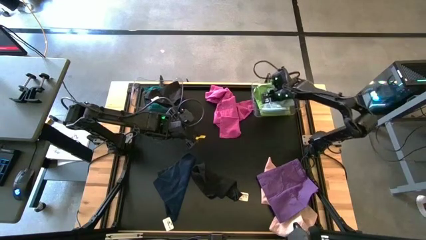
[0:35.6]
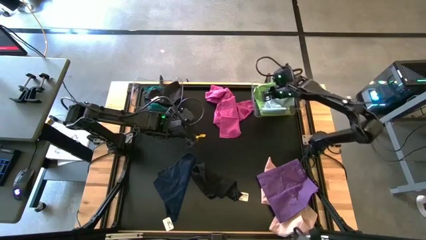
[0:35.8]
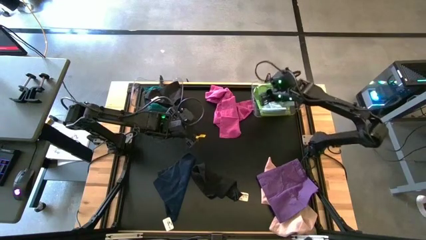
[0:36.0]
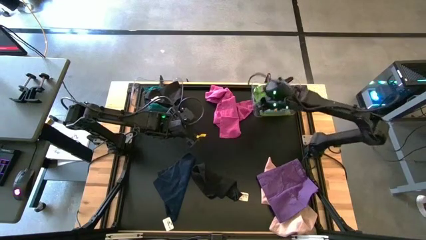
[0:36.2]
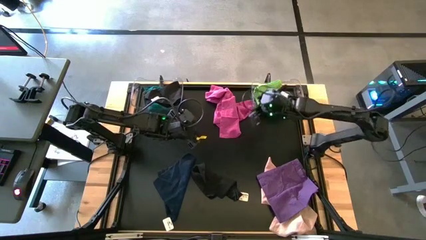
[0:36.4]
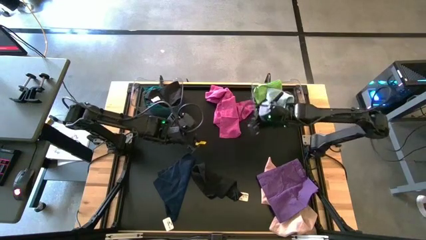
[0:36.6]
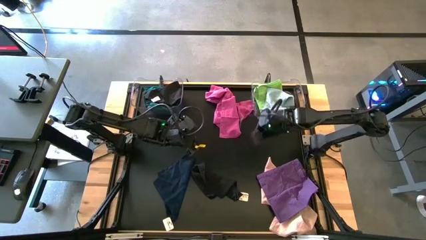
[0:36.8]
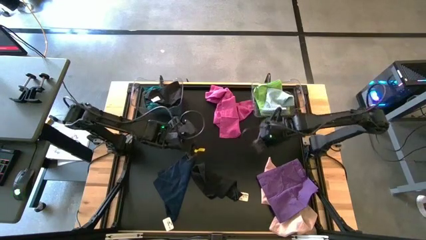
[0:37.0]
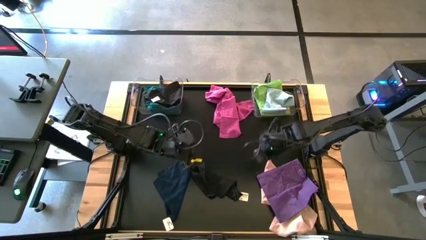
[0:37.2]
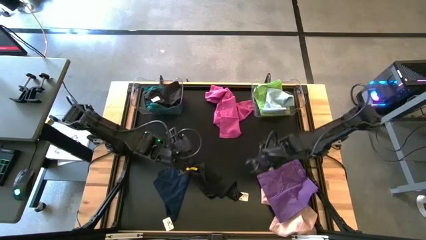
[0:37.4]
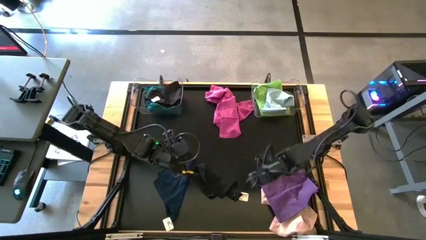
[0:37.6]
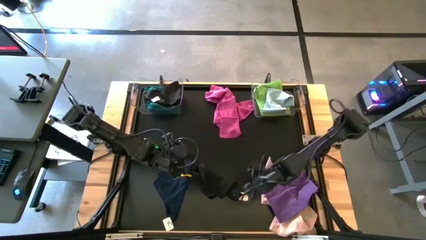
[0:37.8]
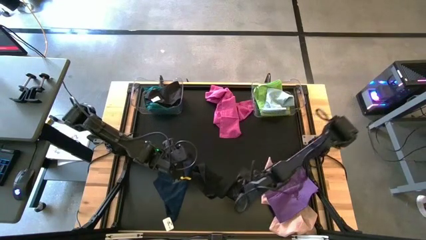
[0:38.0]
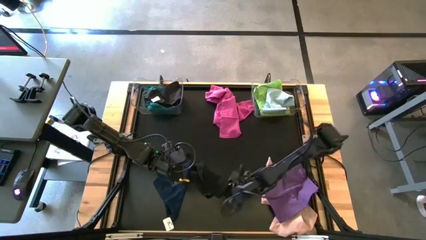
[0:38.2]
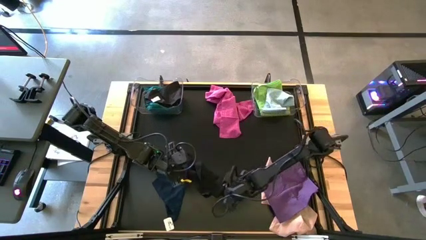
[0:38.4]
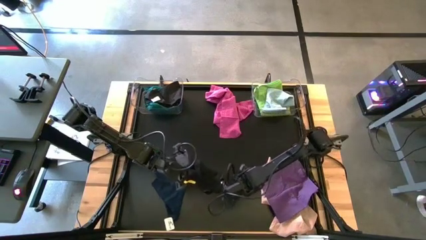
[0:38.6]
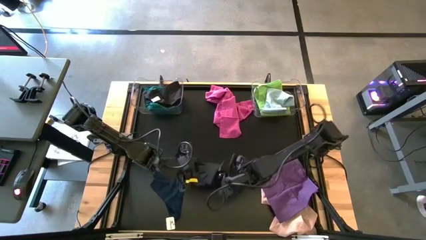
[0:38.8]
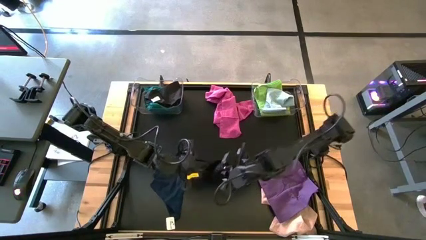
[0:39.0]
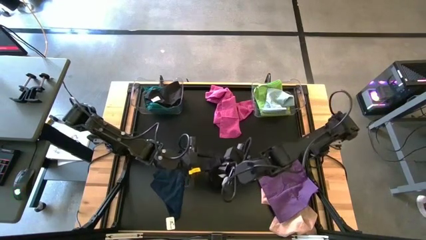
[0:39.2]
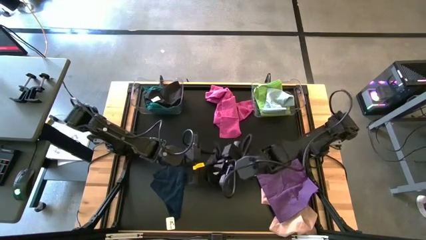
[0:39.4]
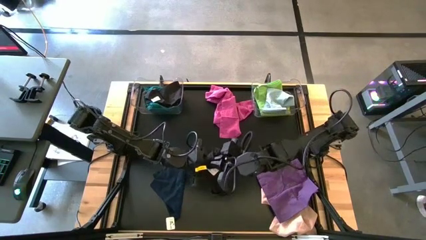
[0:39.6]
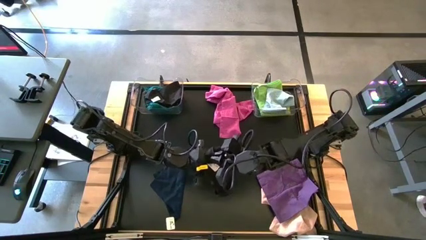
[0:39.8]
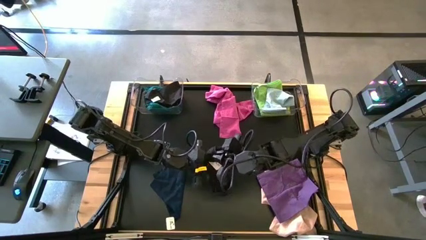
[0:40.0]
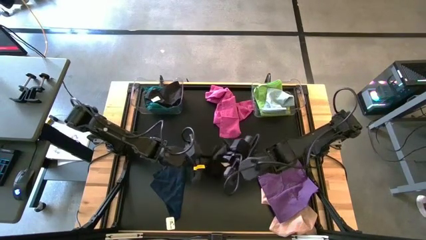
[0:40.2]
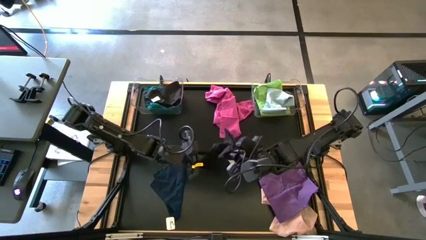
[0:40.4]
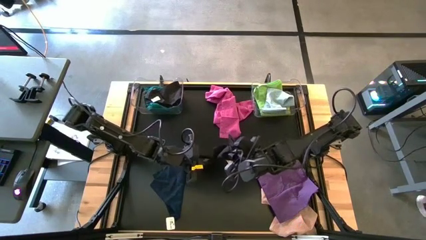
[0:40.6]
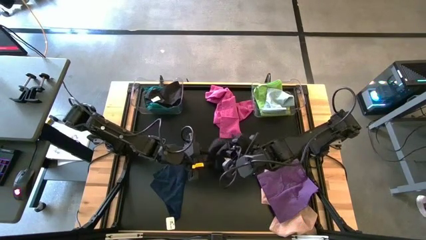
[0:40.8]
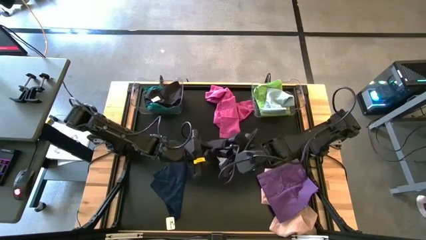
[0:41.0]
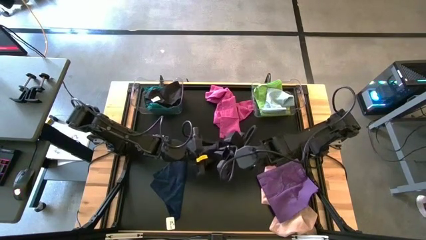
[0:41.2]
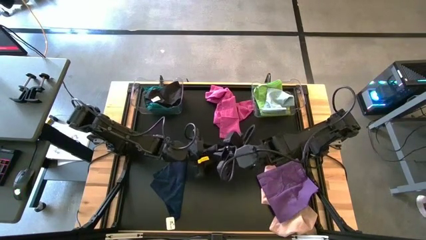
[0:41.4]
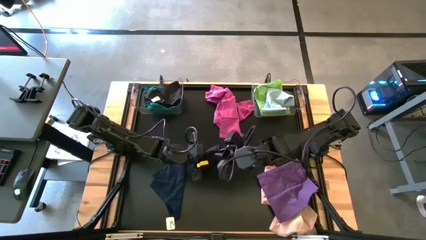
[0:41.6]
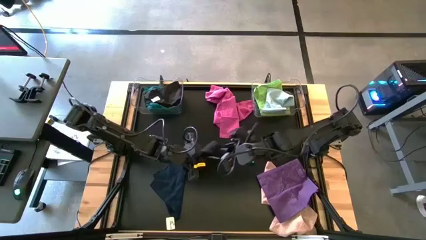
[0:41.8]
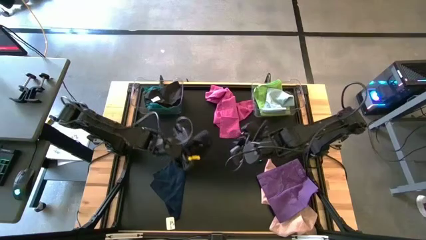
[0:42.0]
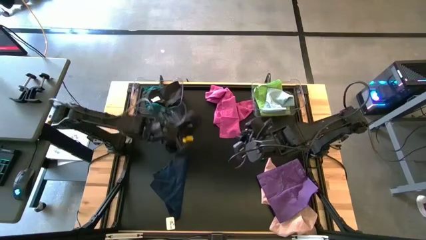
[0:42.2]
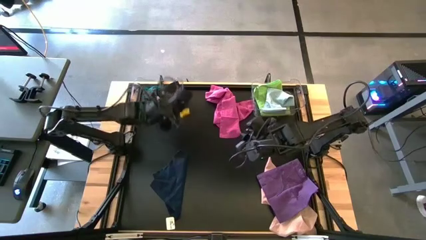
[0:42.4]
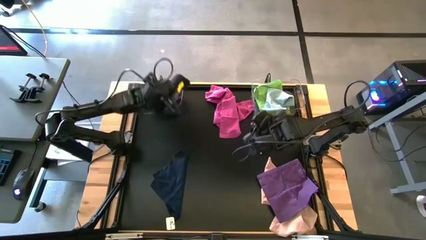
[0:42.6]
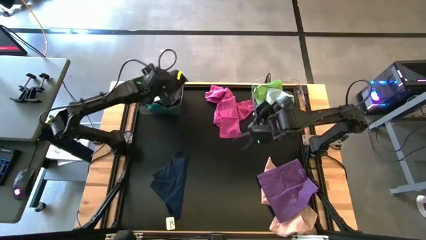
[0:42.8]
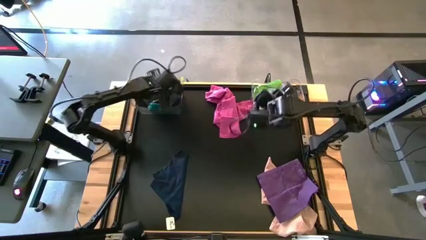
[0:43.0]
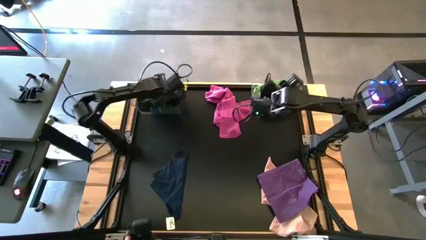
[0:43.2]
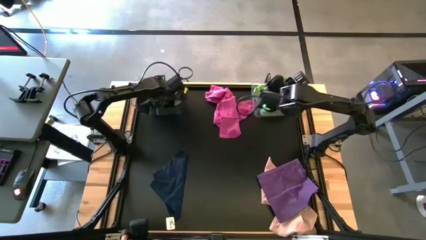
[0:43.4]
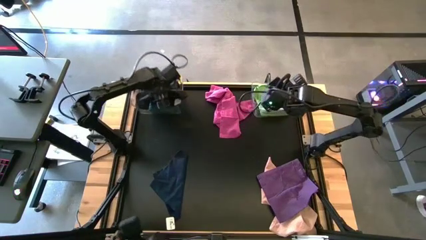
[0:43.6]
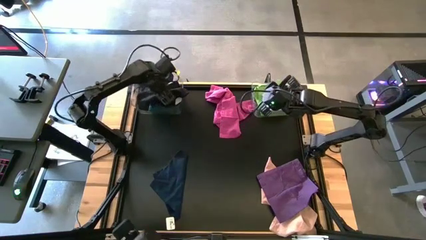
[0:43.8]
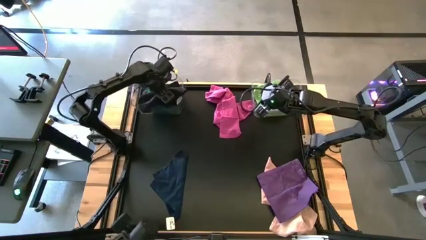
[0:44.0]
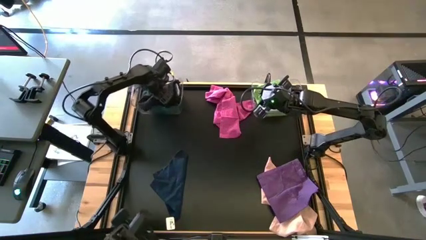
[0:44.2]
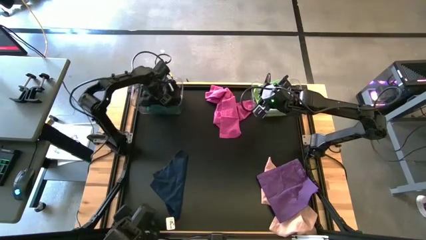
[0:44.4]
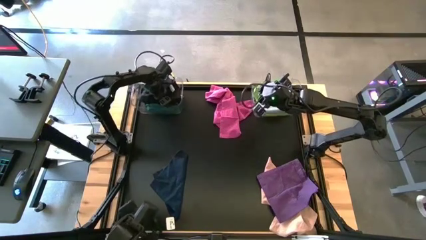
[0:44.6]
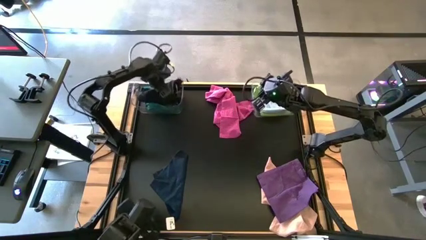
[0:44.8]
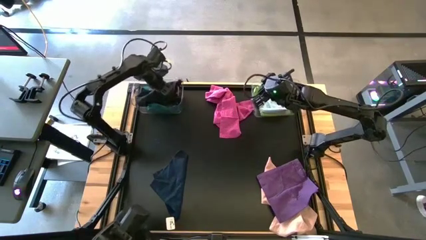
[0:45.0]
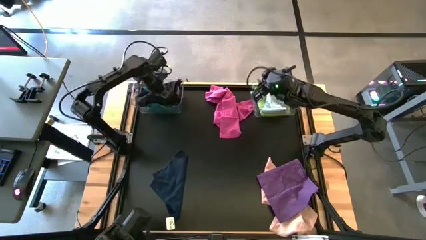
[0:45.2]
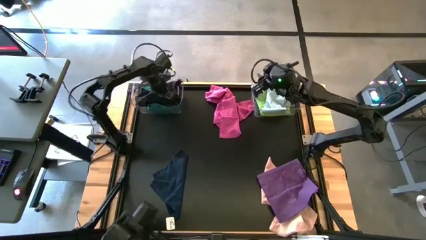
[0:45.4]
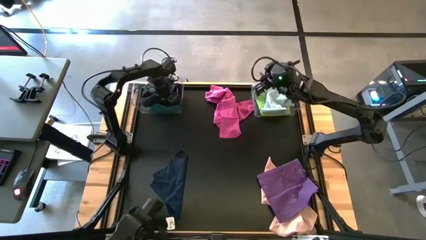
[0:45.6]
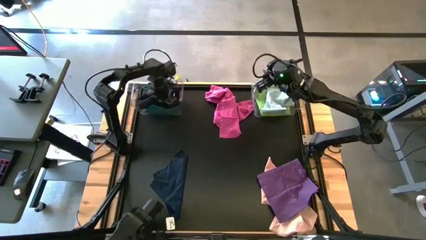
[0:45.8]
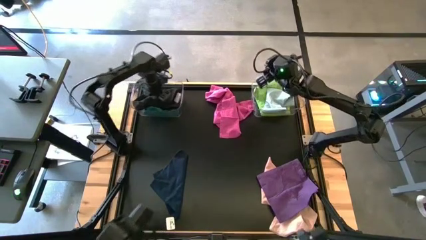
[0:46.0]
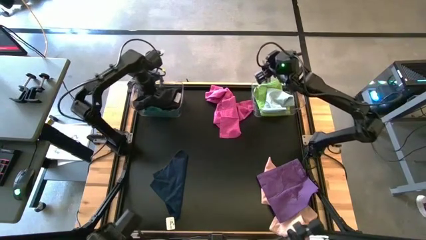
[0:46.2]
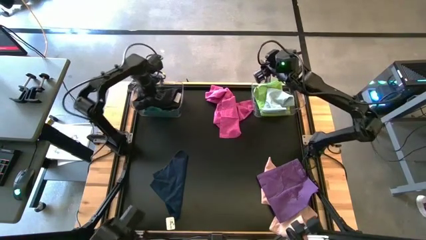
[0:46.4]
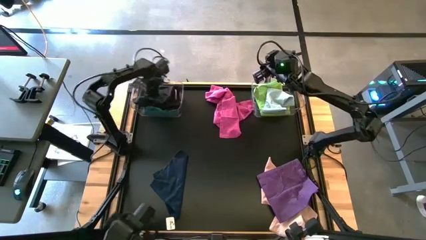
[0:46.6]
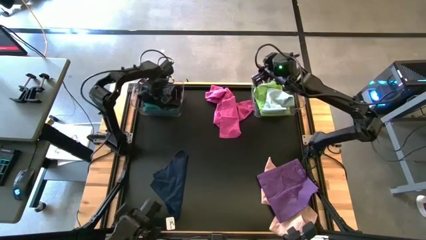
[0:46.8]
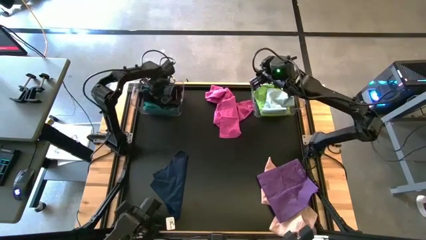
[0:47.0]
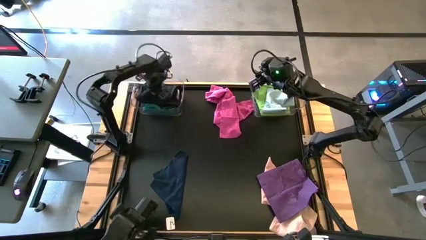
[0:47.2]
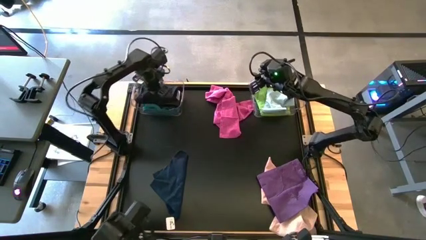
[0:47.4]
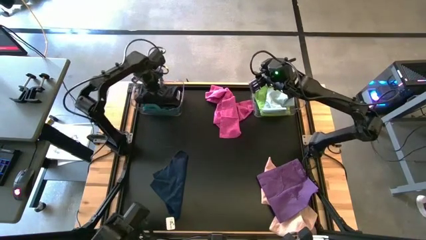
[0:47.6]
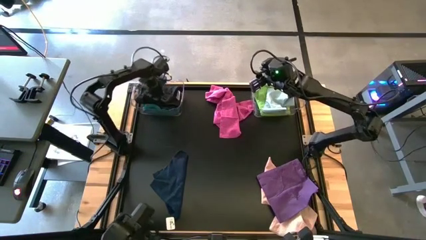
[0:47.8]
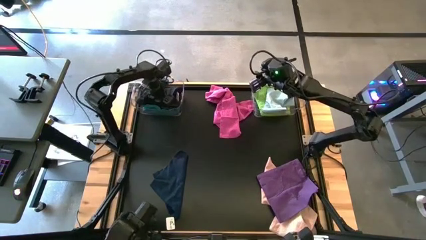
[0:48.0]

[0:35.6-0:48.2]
Task: Sort towels by color in basket
Put the black kitchen towel into the left transparent bin

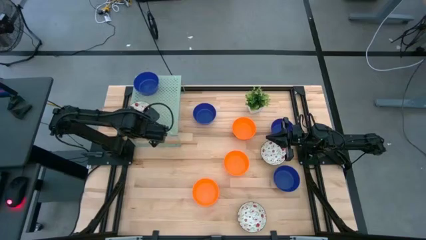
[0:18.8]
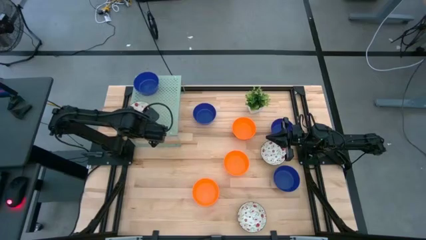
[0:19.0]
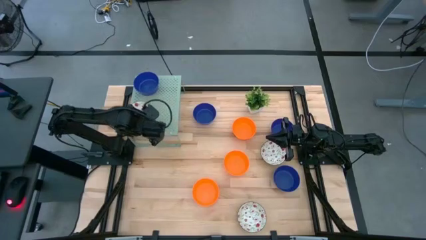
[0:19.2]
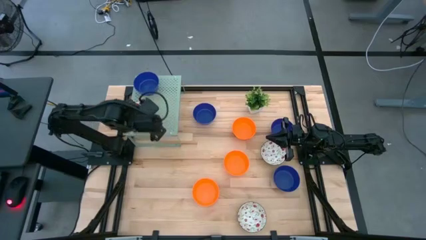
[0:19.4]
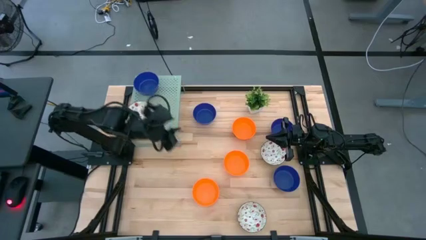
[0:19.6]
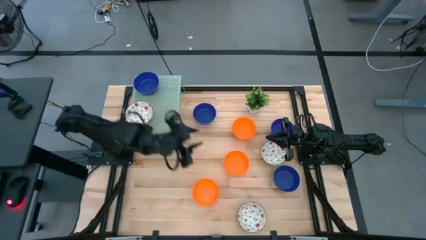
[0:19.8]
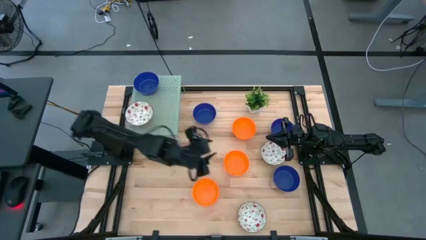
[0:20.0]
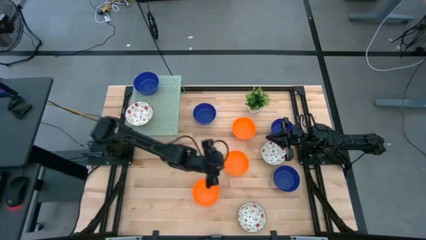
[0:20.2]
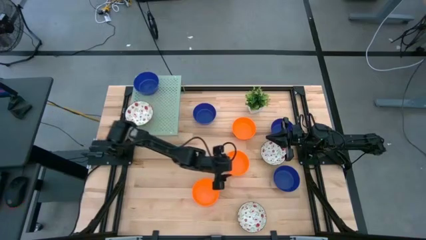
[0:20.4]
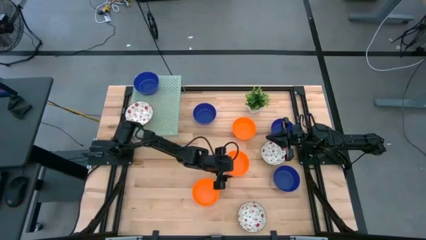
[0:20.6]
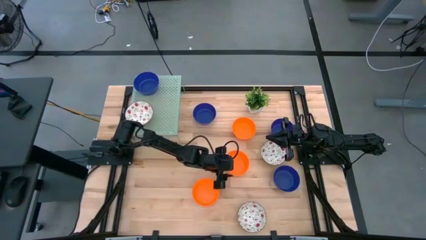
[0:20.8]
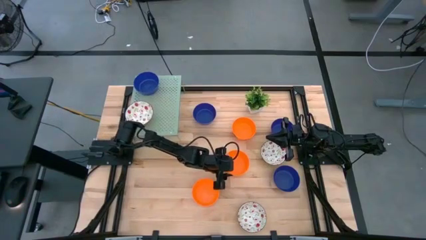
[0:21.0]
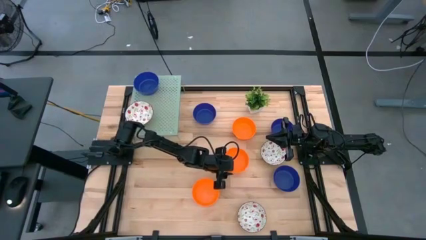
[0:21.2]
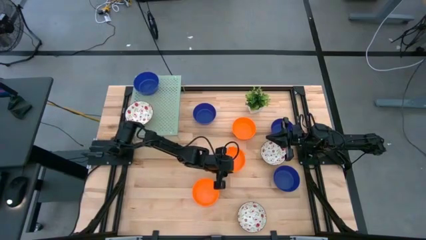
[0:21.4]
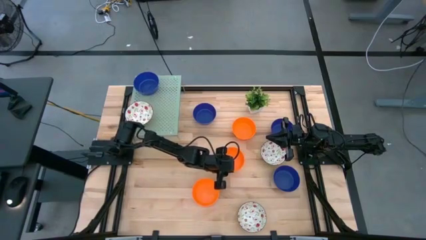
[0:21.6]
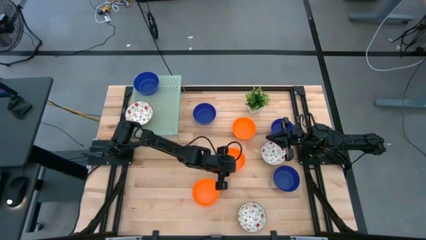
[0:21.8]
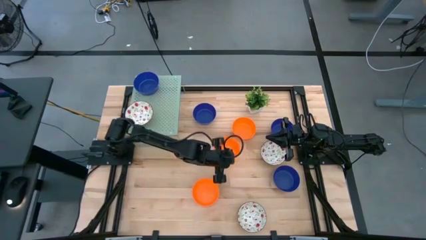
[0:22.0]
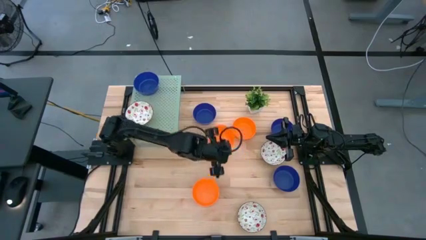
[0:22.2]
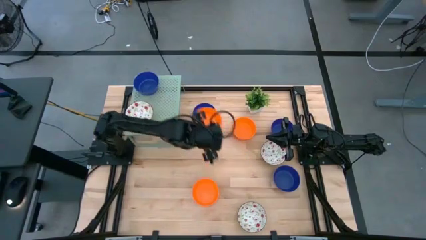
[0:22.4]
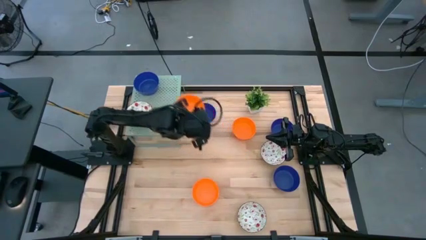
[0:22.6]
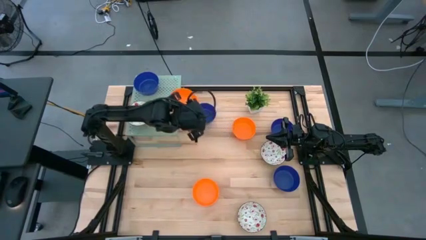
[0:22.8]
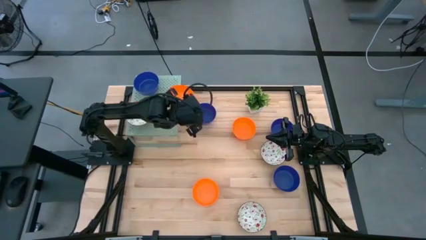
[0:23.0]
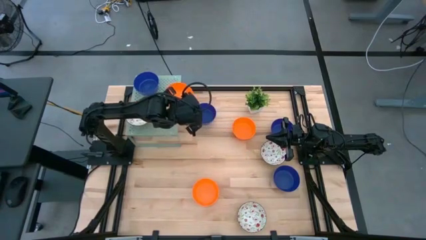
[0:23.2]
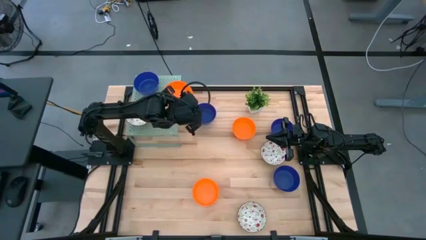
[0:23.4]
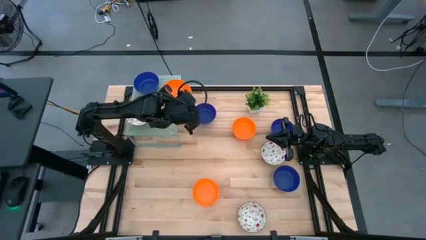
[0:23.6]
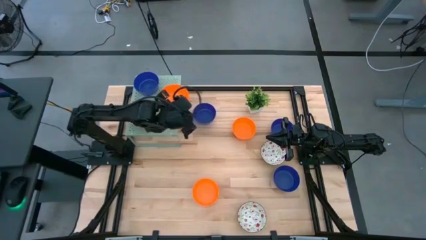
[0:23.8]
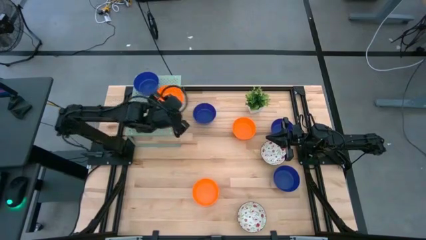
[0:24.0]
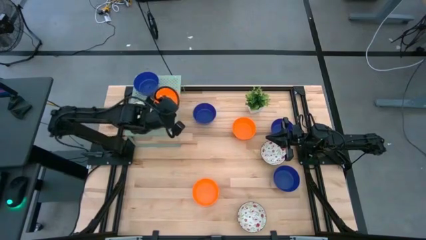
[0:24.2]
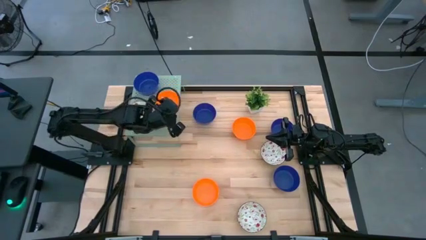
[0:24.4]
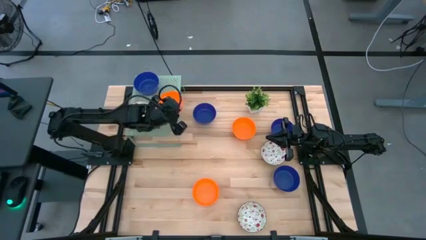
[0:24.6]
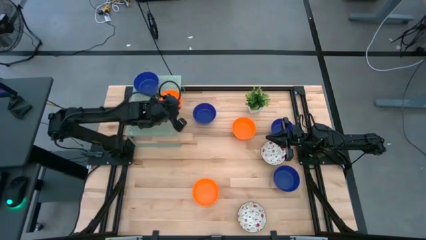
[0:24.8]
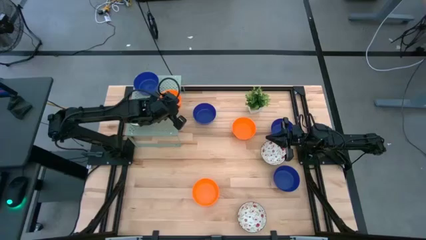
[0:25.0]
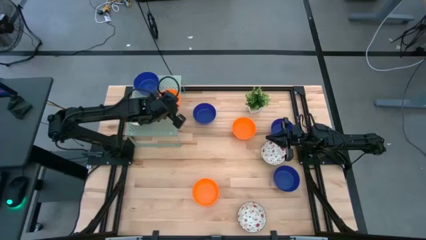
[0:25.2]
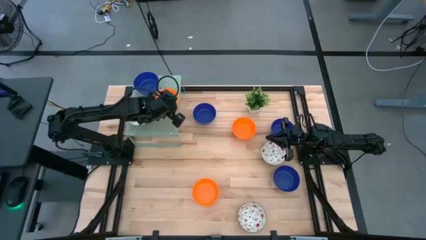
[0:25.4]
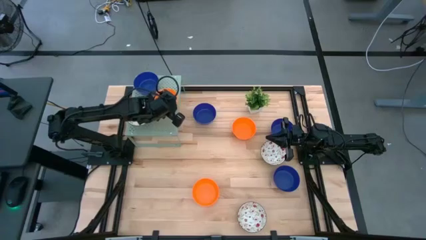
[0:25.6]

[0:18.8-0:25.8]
Task: Pick & Place Mini bowls
Put the orange bowl on the shelf
